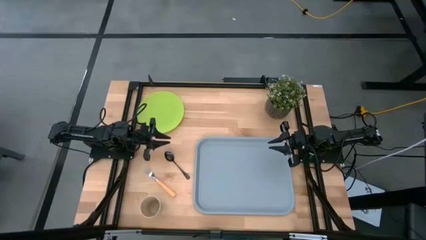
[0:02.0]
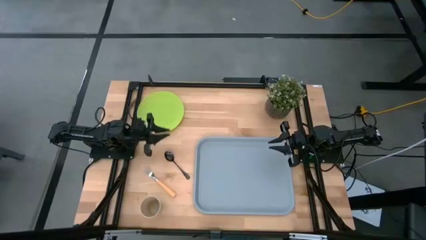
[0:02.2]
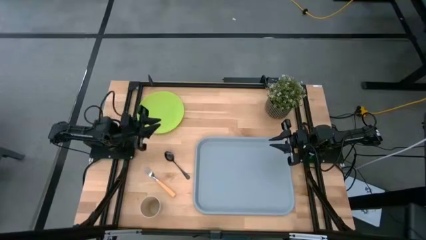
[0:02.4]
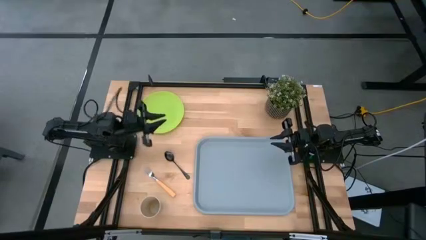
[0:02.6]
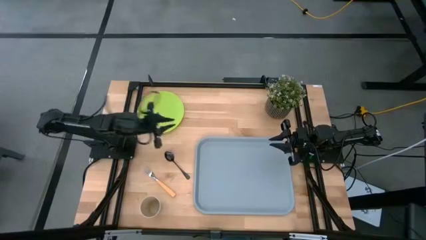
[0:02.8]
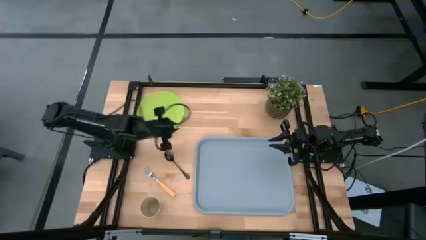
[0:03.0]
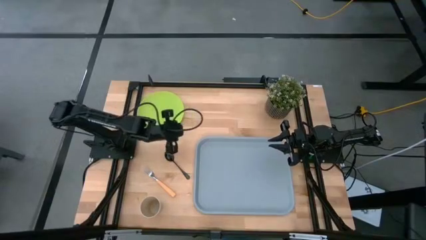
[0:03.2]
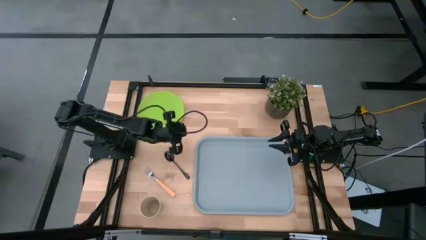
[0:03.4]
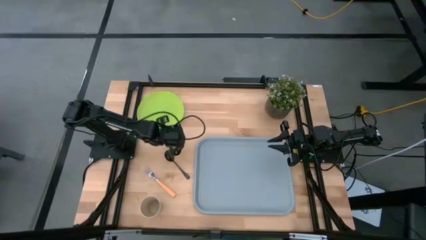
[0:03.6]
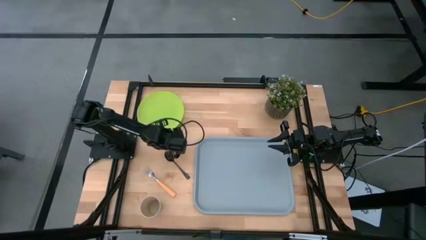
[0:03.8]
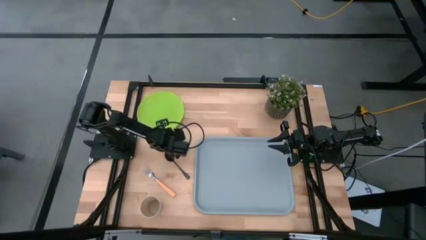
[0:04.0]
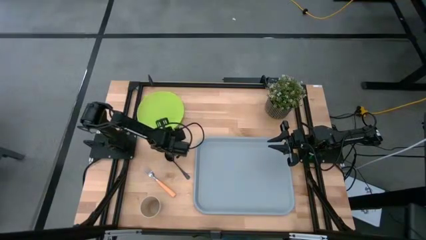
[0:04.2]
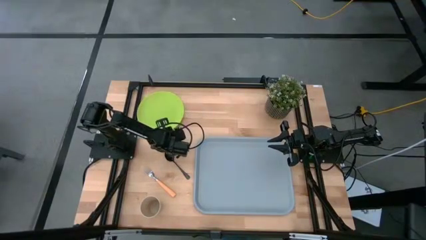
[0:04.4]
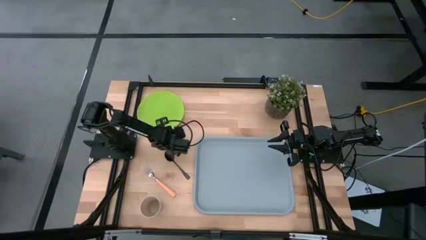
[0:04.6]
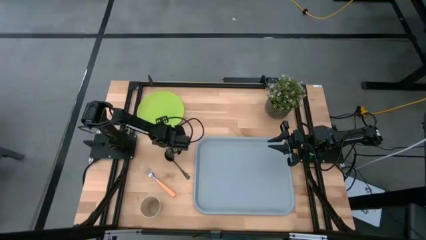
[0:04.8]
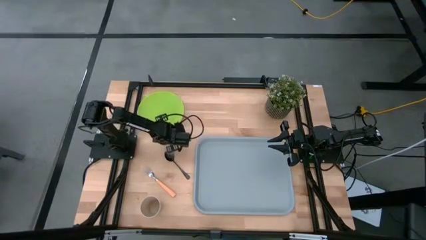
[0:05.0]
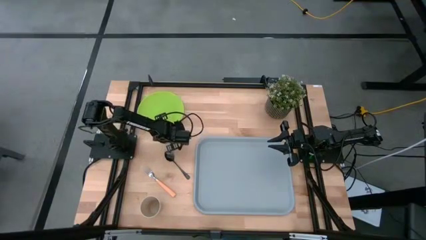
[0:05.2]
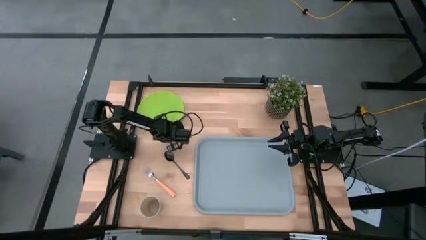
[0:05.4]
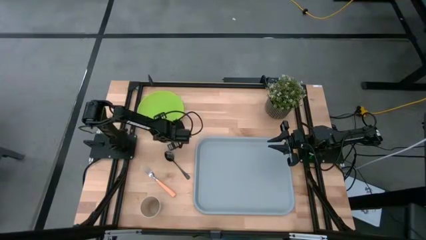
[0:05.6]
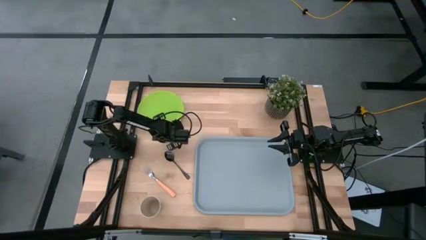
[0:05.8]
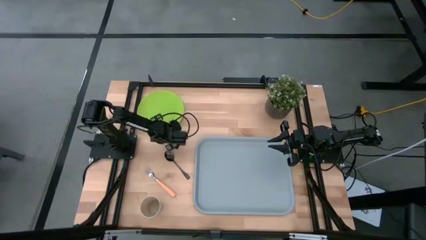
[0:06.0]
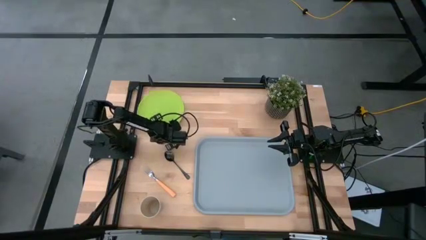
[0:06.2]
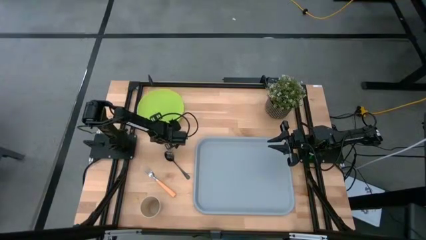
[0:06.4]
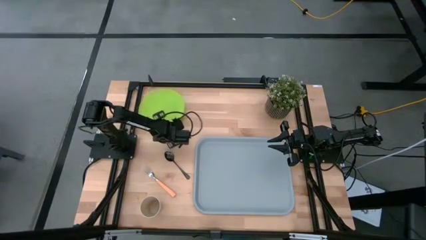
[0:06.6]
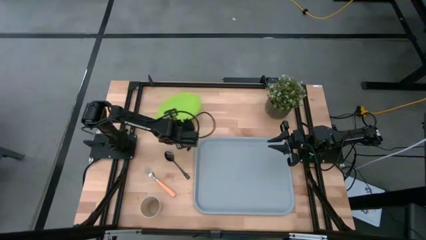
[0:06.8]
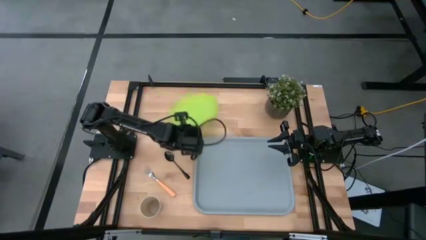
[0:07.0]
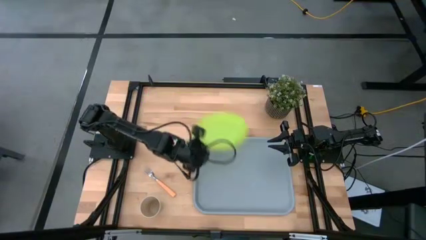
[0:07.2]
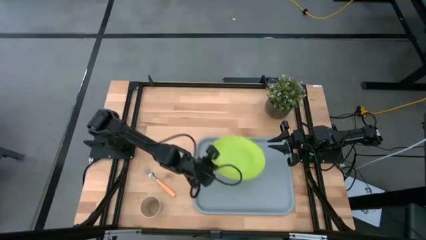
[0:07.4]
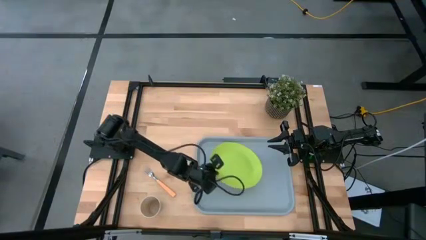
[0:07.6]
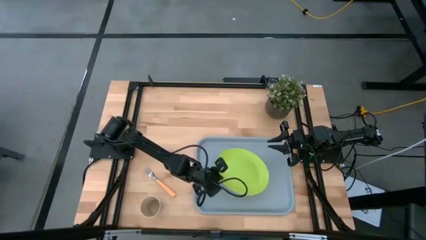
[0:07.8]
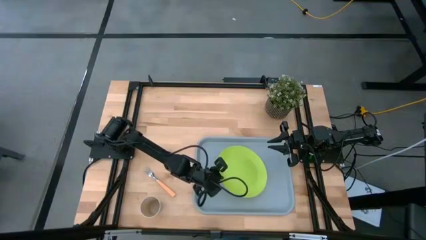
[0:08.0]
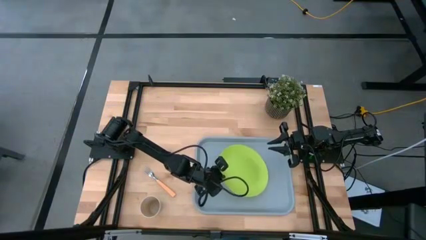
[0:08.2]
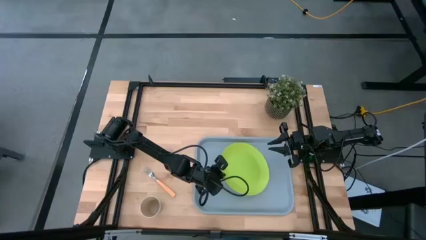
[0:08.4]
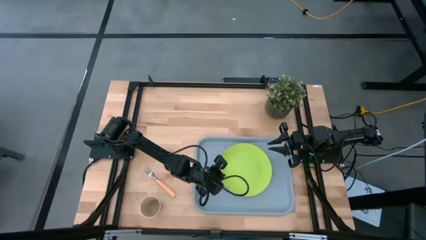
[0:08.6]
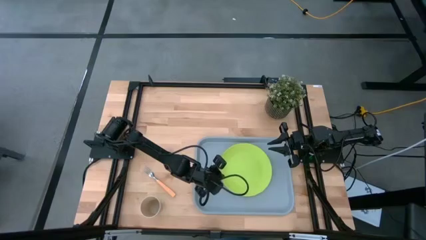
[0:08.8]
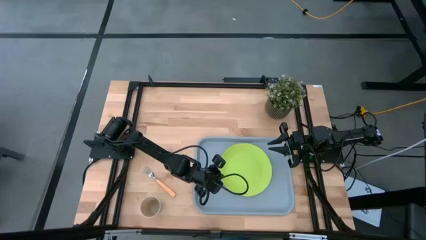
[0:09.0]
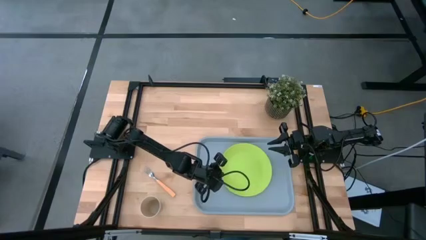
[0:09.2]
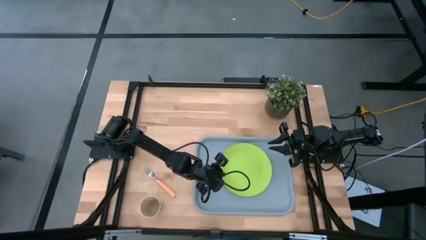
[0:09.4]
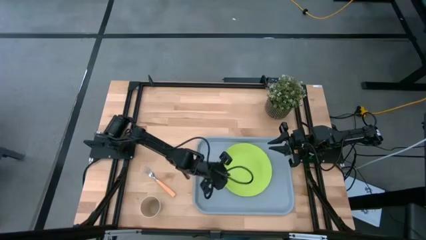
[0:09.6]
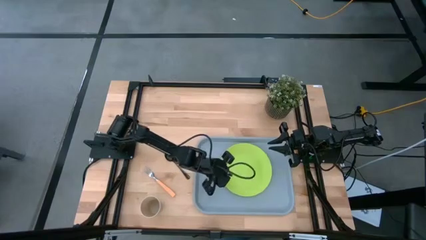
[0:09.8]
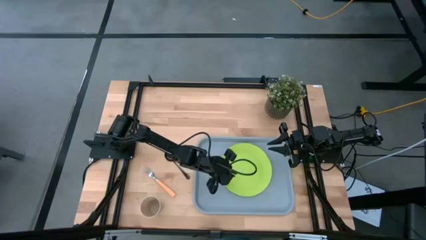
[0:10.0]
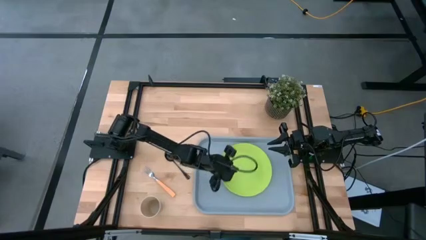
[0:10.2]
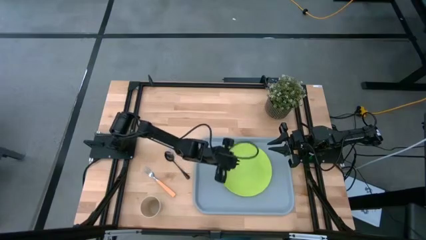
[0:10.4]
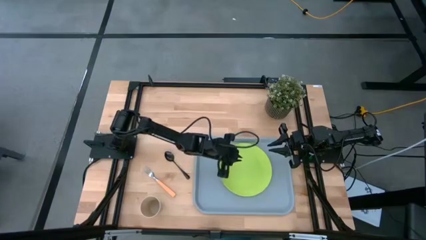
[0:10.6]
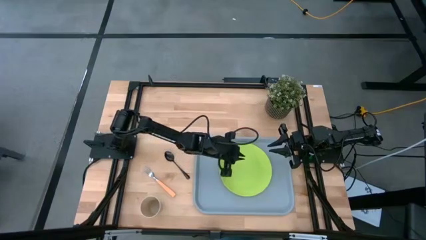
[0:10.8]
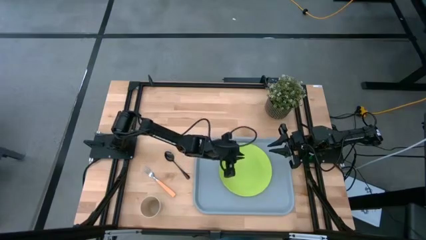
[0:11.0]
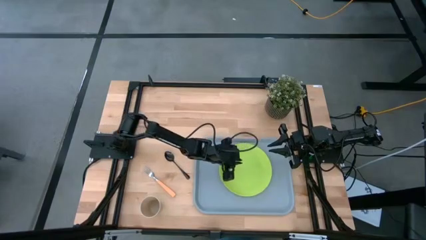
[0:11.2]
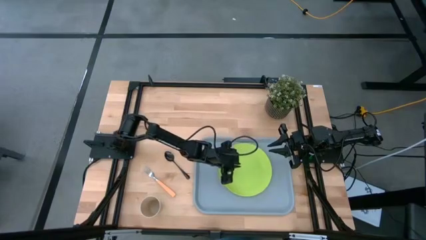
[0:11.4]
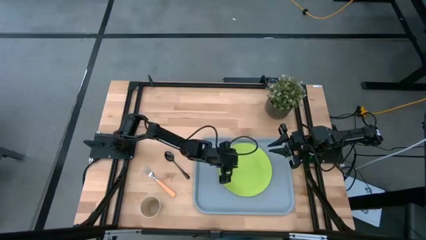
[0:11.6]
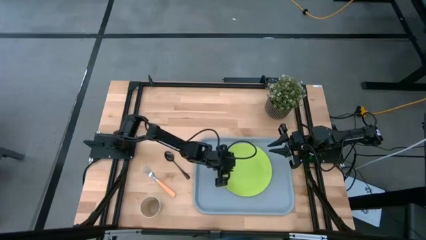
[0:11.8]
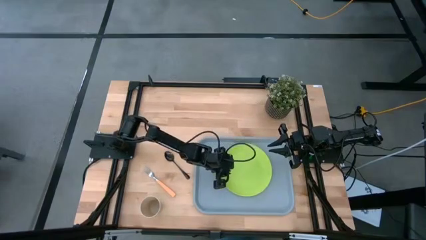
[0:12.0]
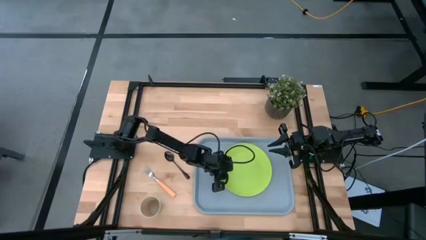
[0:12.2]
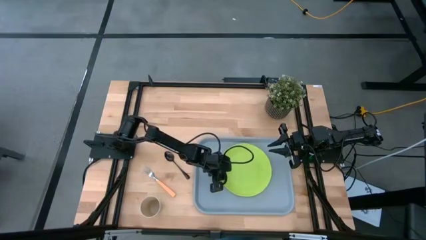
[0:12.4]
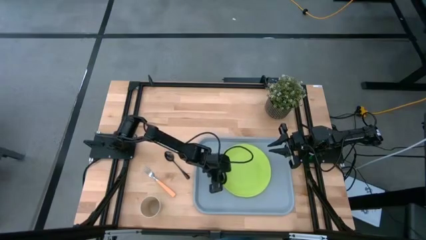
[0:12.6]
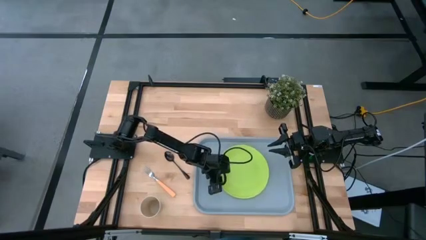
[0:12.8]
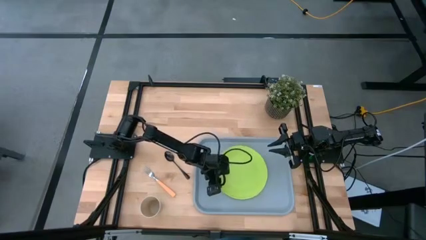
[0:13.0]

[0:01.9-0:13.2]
Task: Pick and place plate/cup/fork/spoon on tray
Put the green plate on the center of the gray serving tray

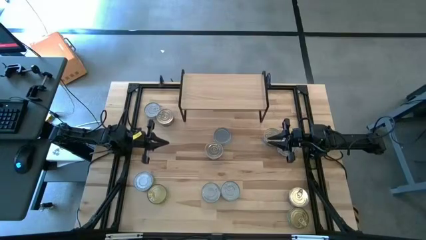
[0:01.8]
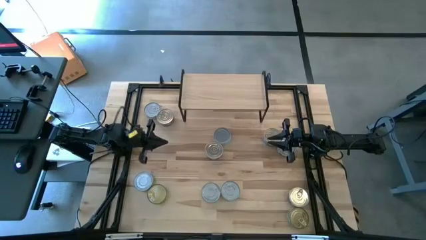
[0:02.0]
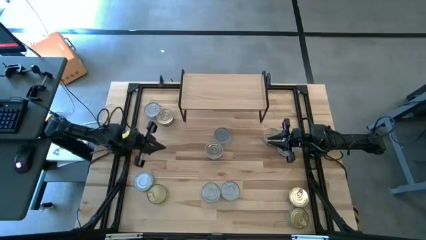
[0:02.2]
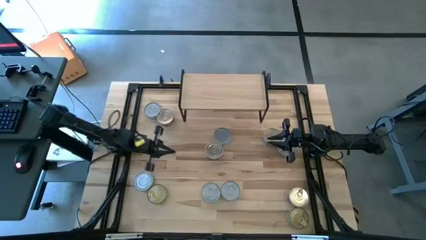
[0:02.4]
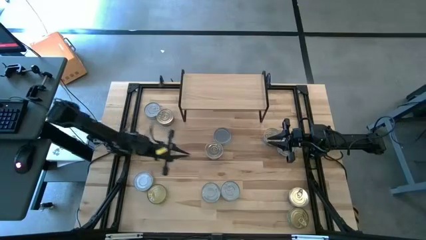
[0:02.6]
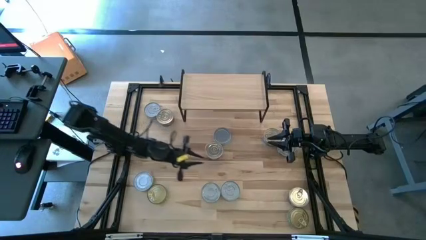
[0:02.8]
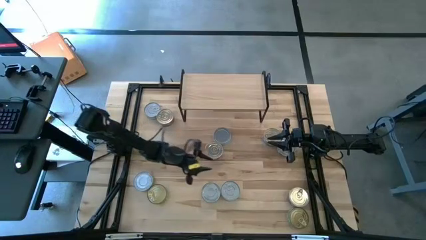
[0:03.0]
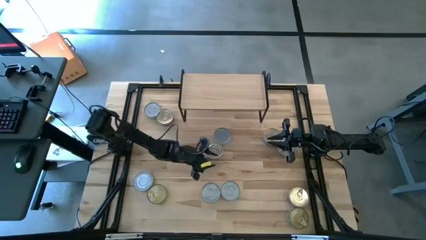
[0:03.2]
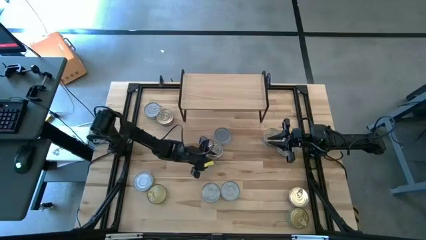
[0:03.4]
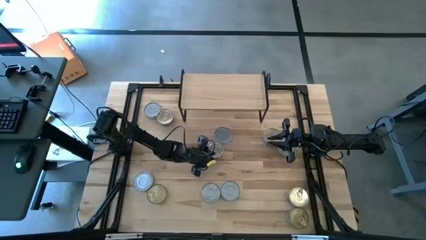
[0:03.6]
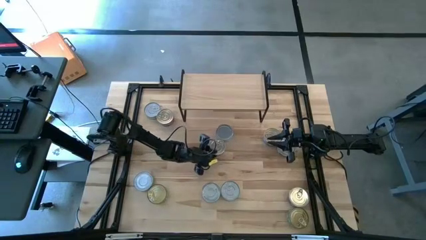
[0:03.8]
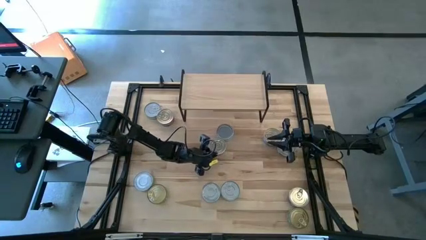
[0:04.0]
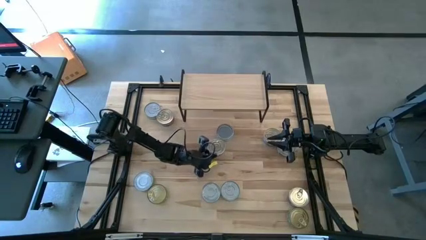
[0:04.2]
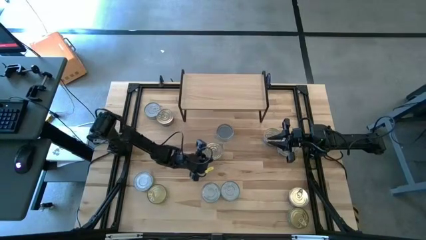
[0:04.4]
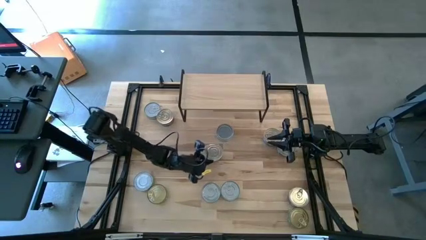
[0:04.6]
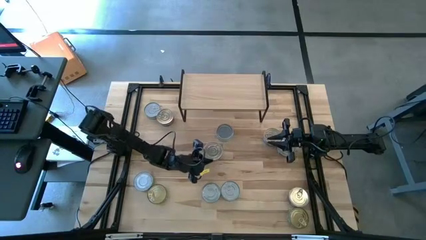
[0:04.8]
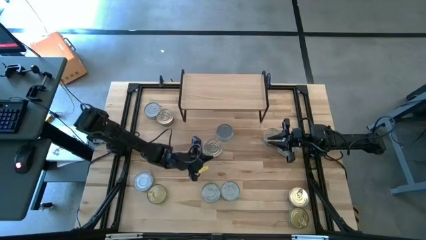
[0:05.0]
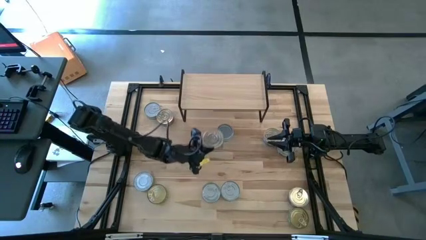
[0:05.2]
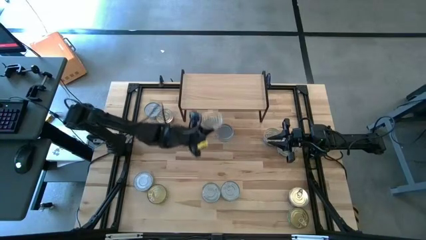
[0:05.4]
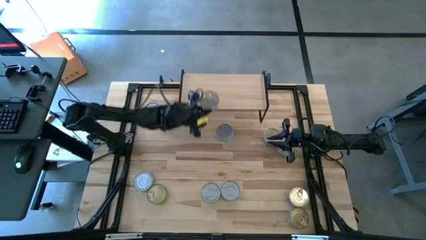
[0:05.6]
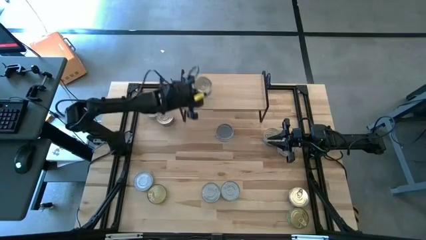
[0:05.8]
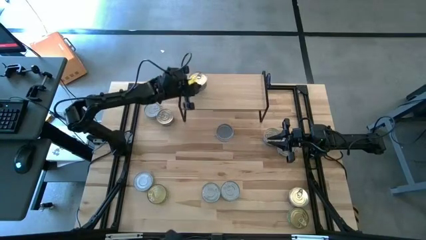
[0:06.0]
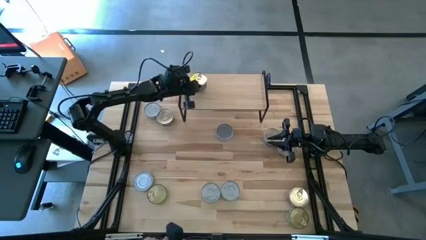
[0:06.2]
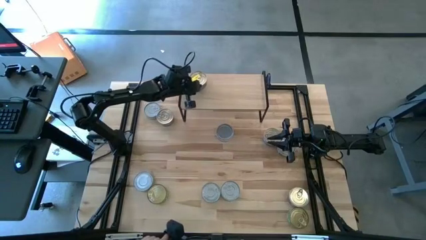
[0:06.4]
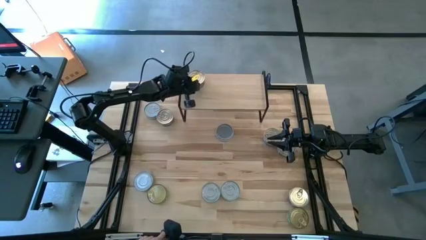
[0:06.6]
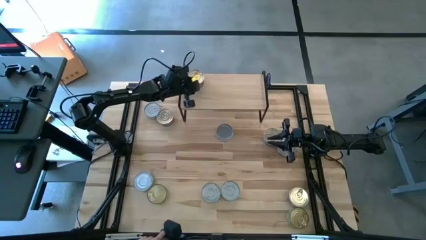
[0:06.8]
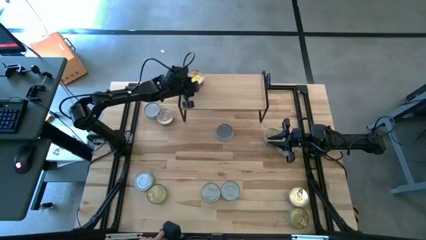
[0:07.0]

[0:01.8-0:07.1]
Task: Stack canned seafood by type on shelf
Put the blue pink tuna can on the shelf
